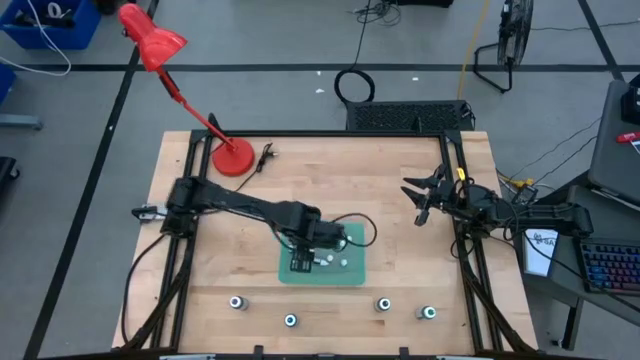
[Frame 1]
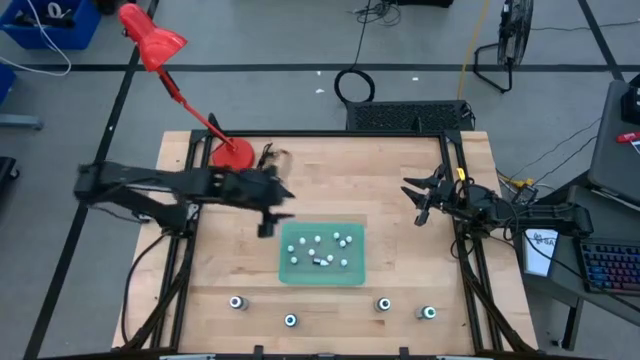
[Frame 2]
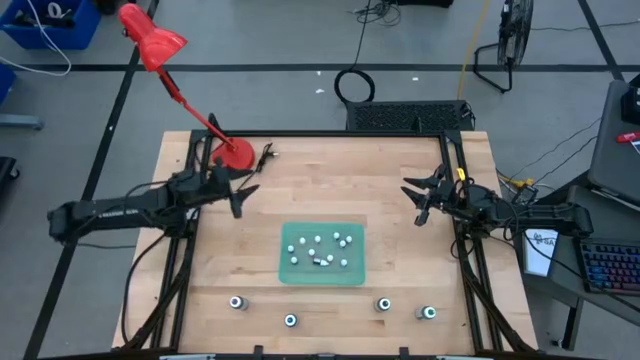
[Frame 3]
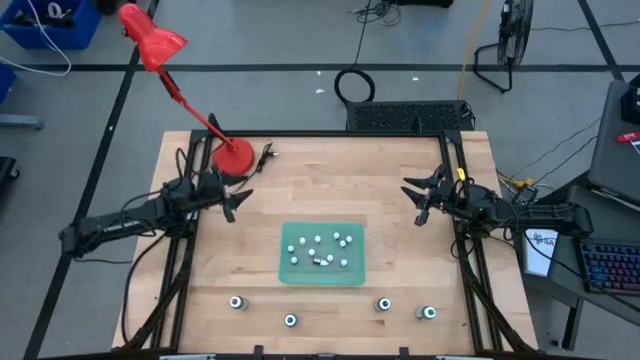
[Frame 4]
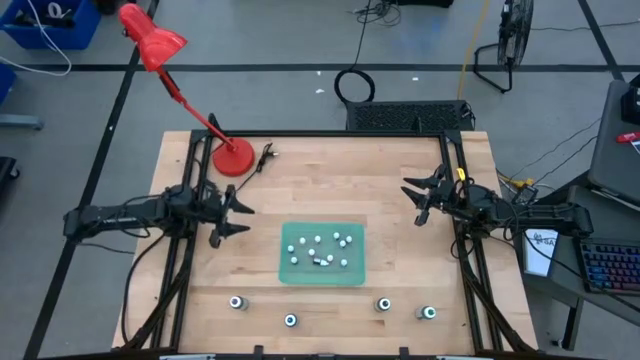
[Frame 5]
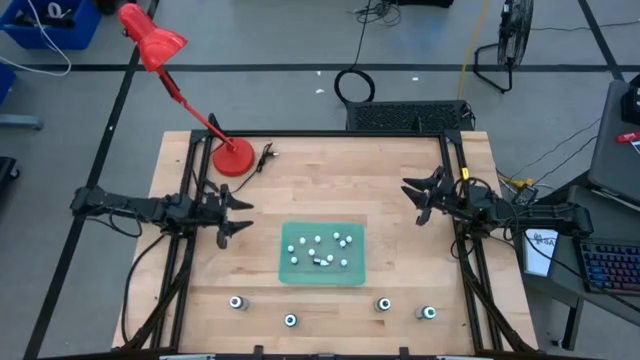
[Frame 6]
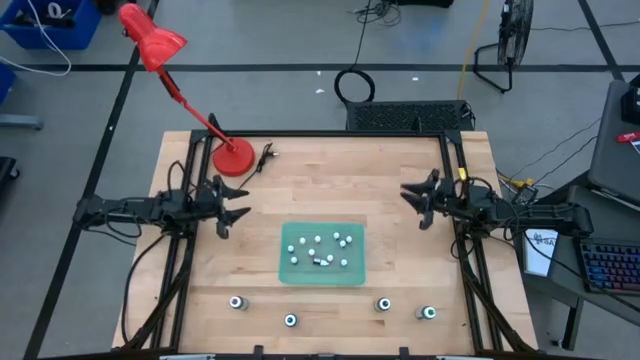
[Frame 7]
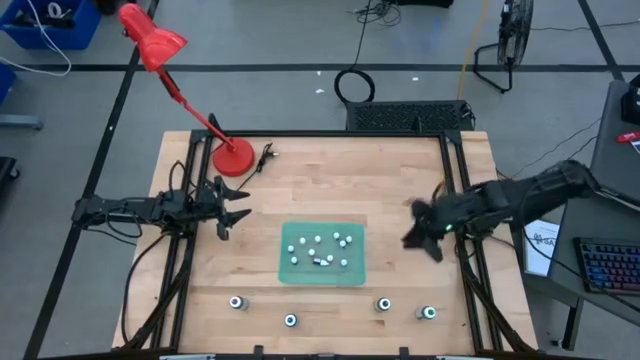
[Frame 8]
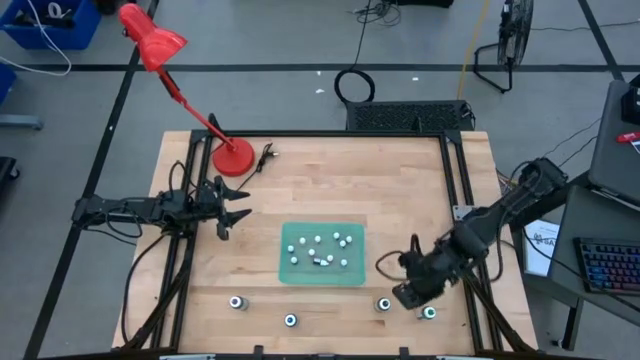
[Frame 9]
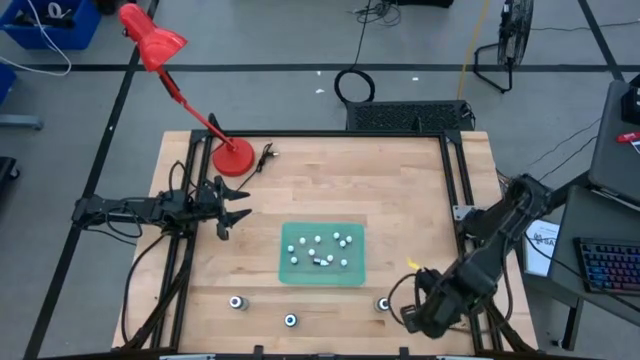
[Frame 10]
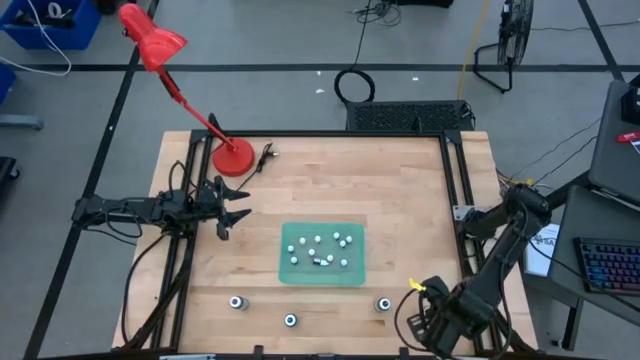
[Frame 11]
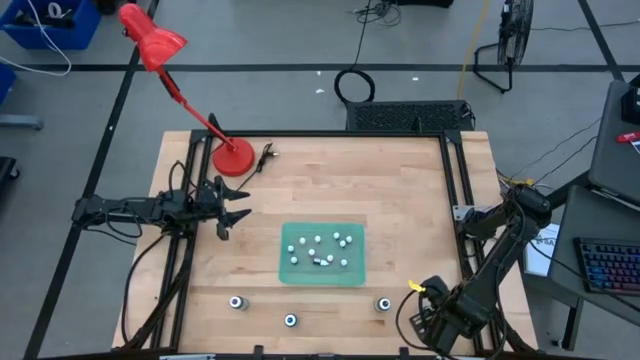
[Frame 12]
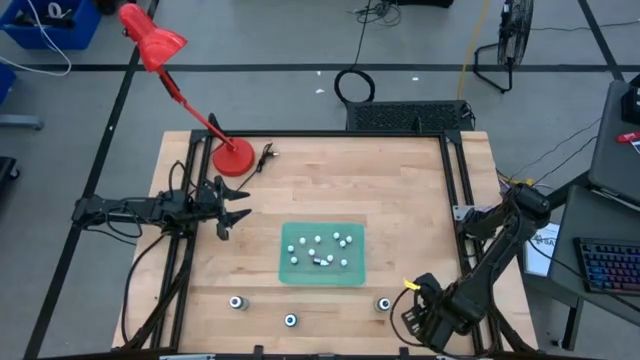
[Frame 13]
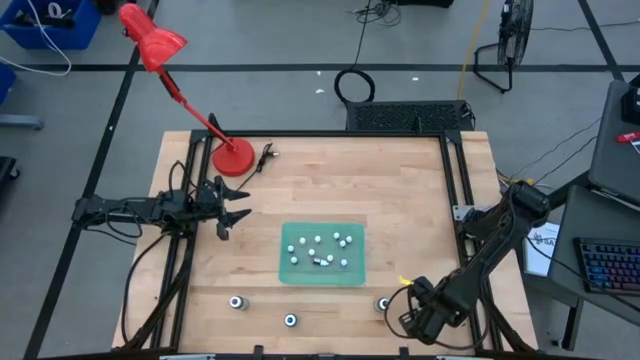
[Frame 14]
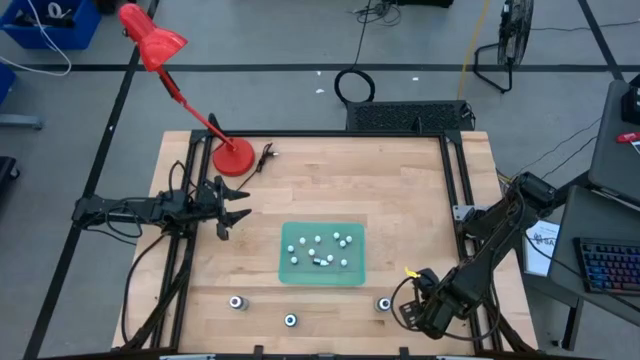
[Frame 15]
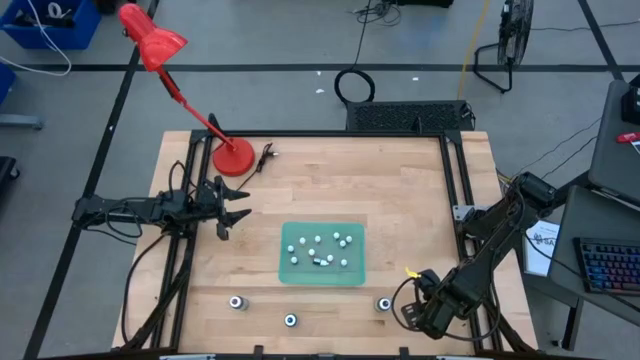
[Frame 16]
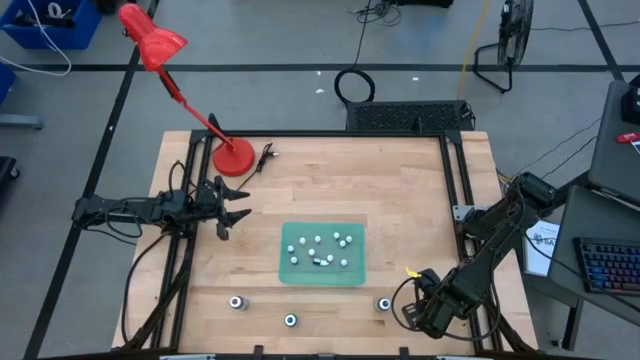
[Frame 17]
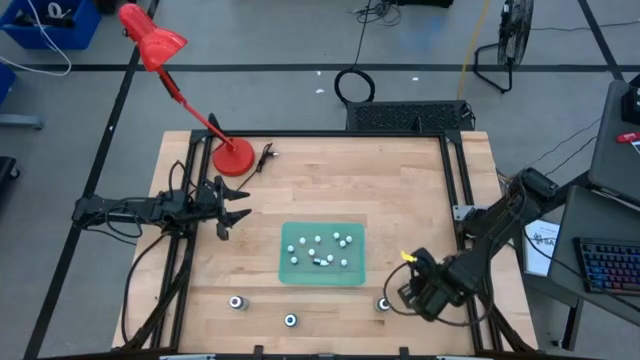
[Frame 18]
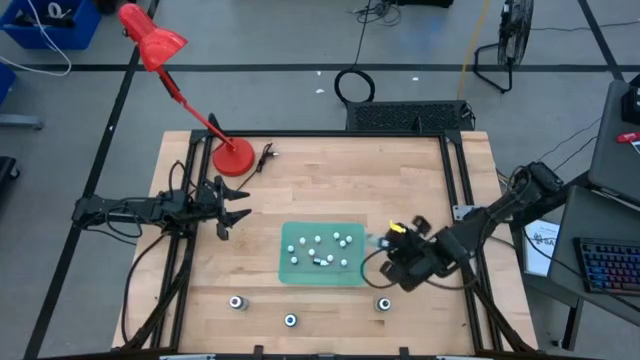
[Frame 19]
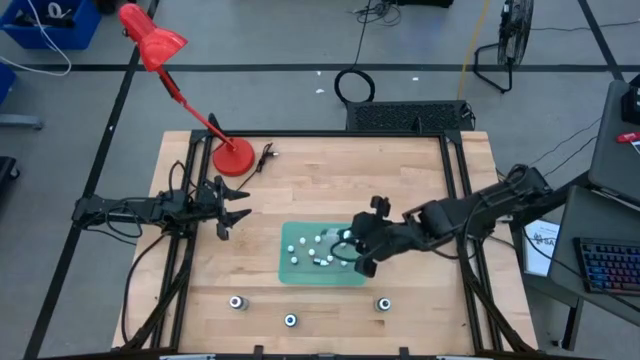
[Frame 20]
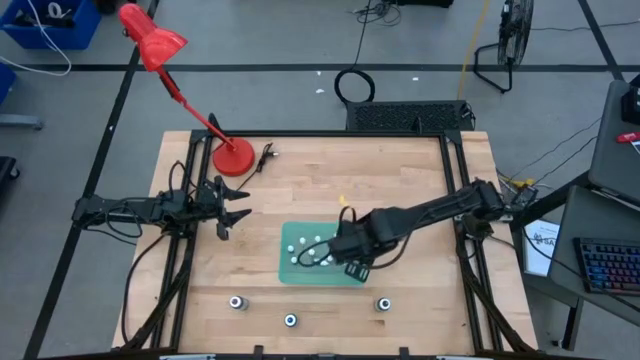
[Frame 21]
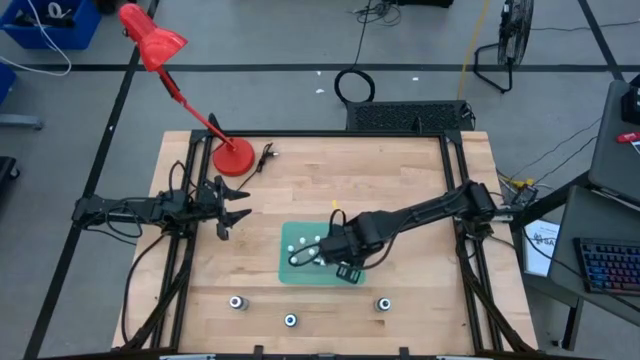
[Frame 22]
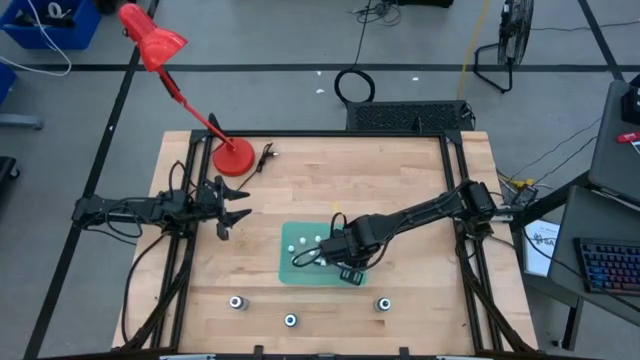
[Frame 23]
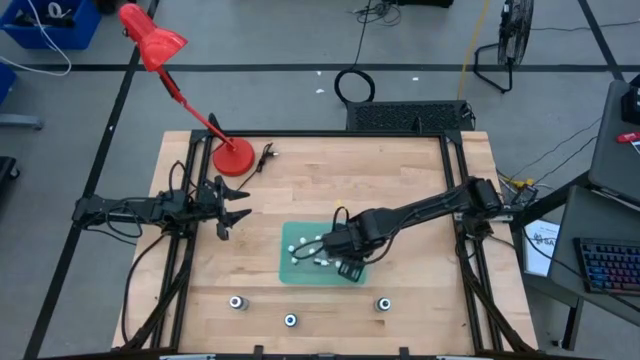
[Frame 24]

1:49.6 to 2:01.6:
Task: Pick & Place food coloring
Put the large green food coloring bottle into the green bin

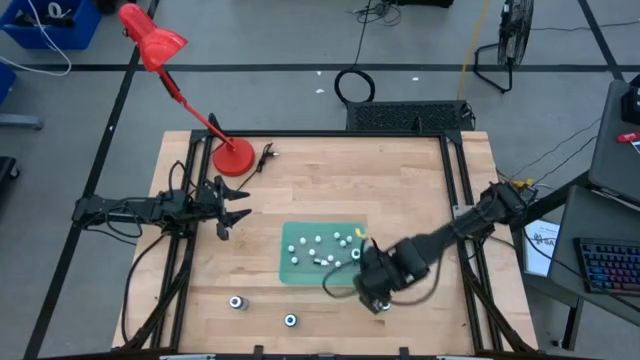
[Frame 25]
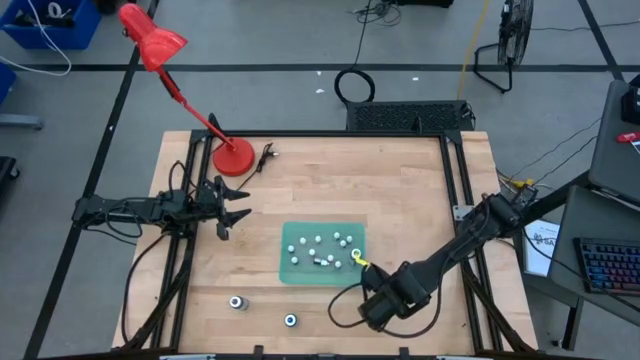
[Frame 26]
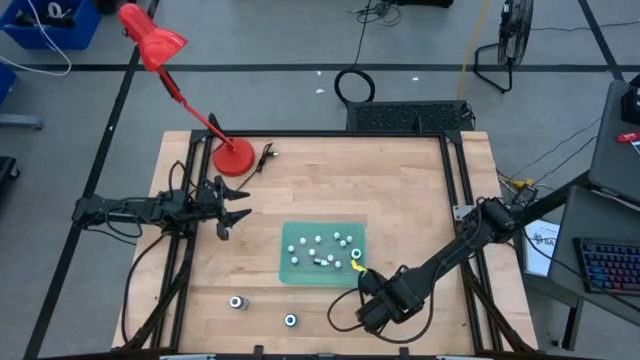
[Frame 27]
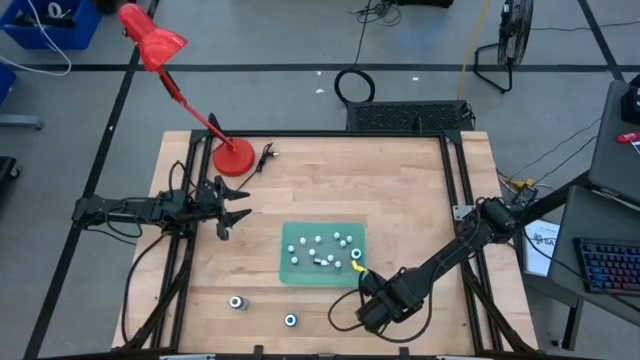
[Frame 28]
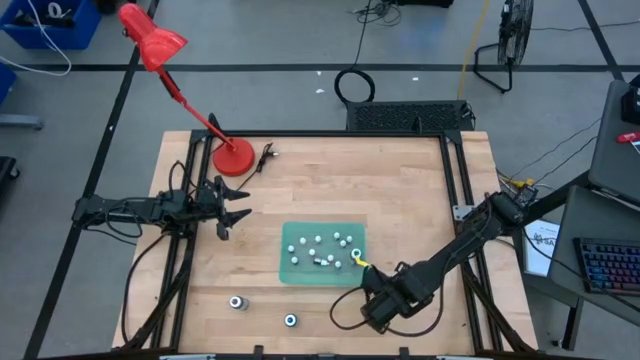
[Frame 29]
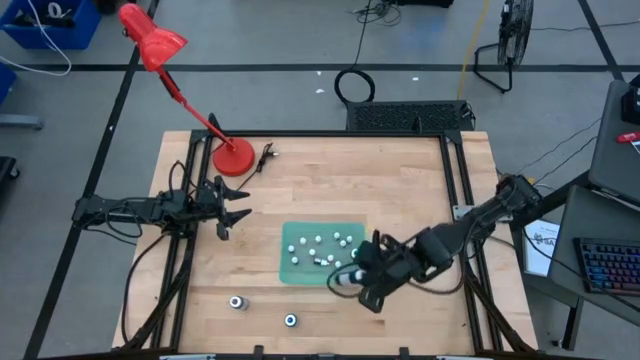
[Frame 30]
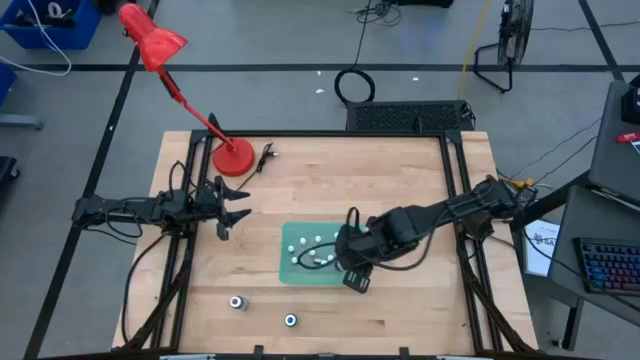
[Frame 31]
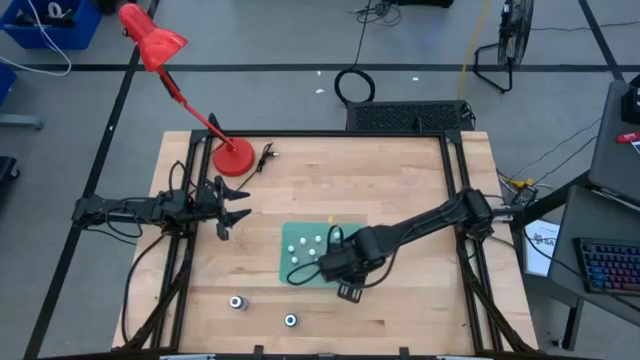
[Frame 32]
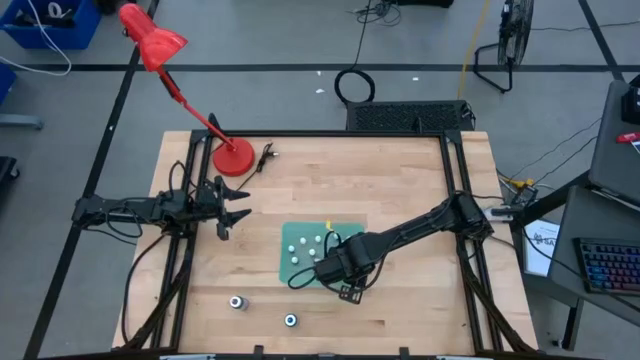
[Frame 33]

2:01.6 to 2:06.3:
Put the large black food coloring bottle into the green bin

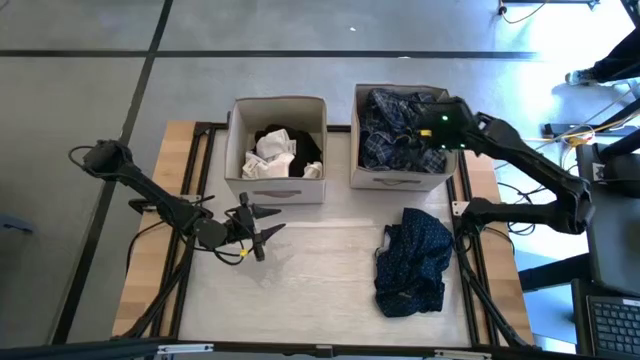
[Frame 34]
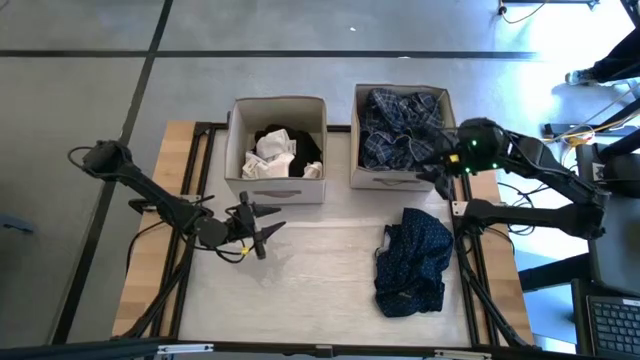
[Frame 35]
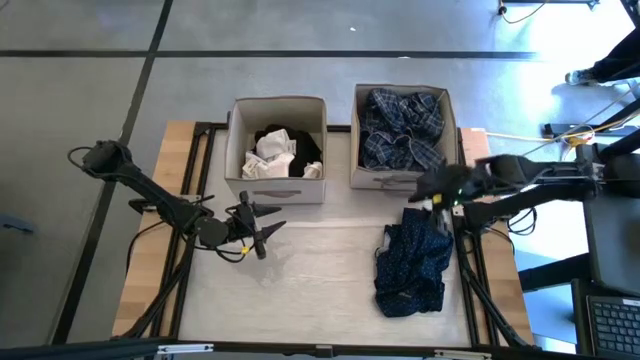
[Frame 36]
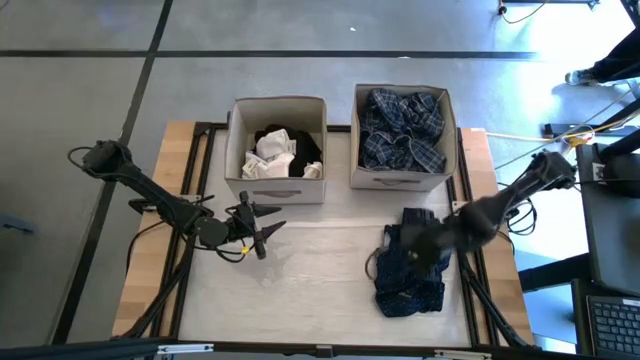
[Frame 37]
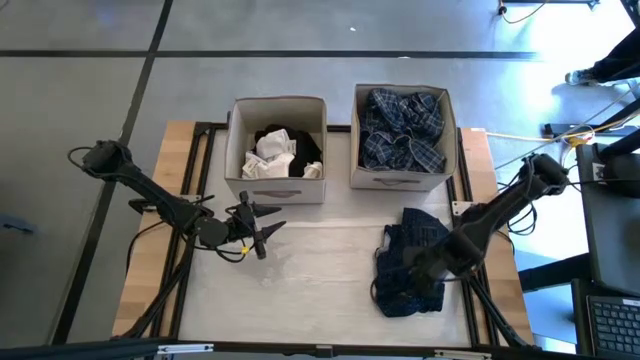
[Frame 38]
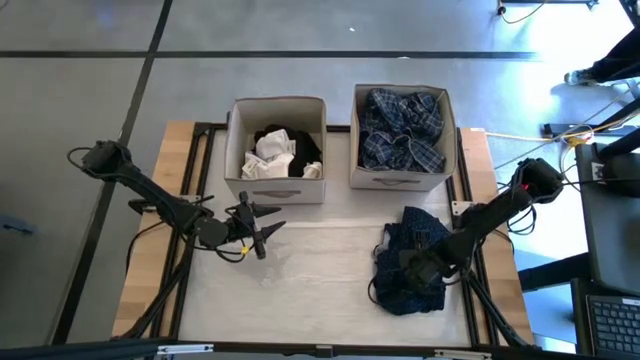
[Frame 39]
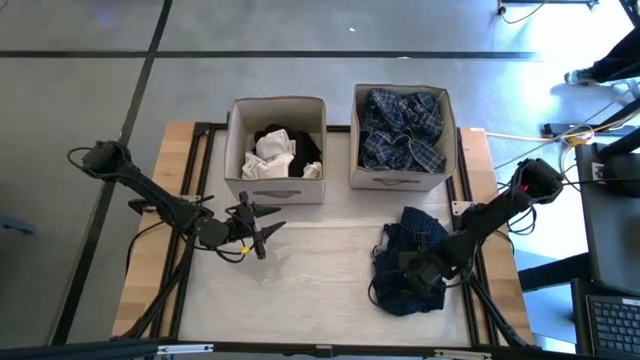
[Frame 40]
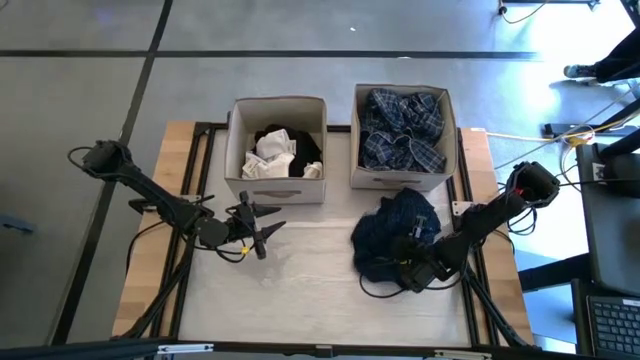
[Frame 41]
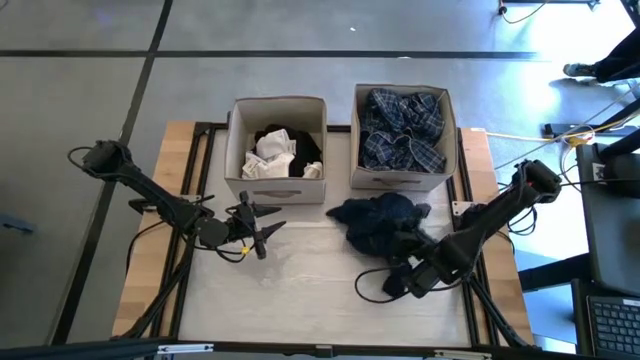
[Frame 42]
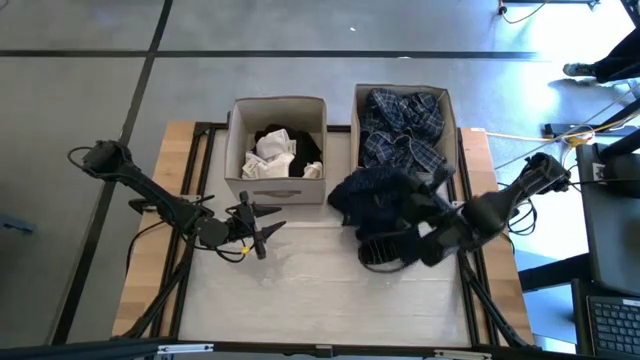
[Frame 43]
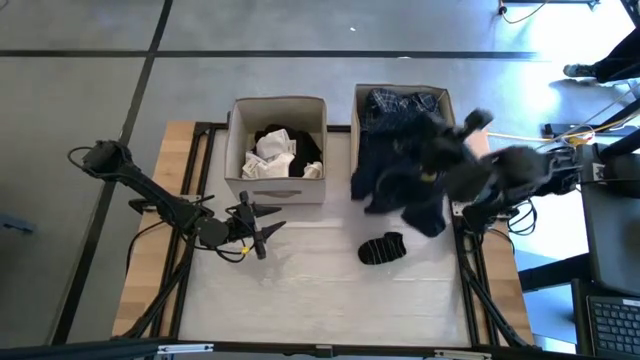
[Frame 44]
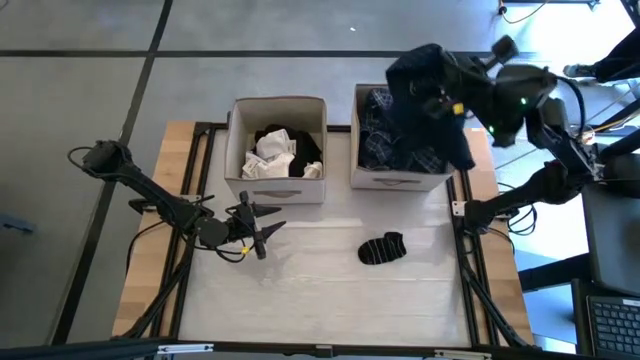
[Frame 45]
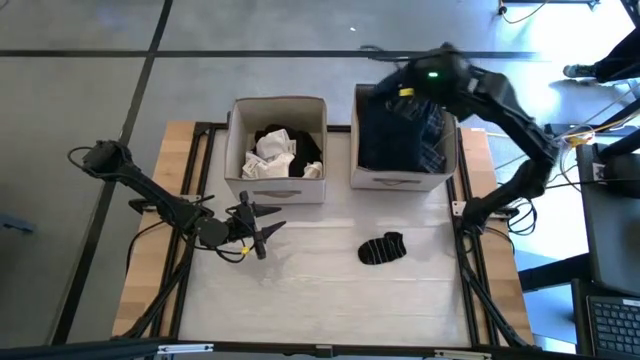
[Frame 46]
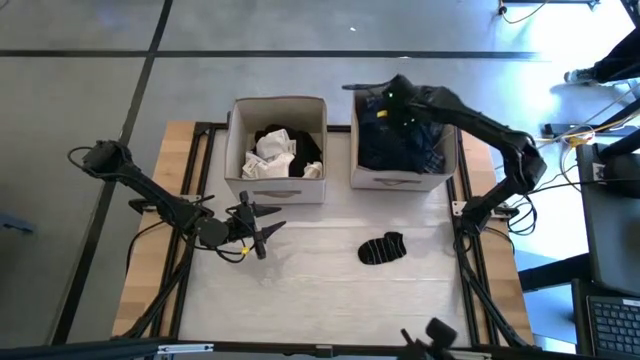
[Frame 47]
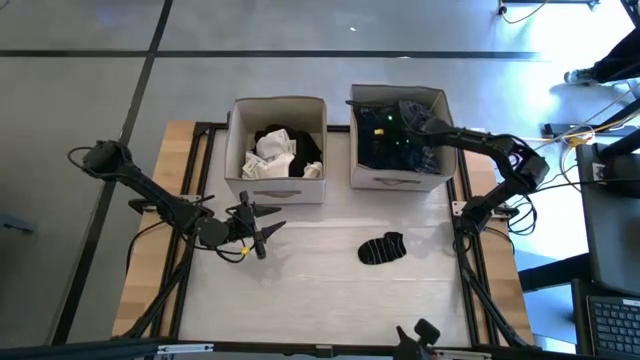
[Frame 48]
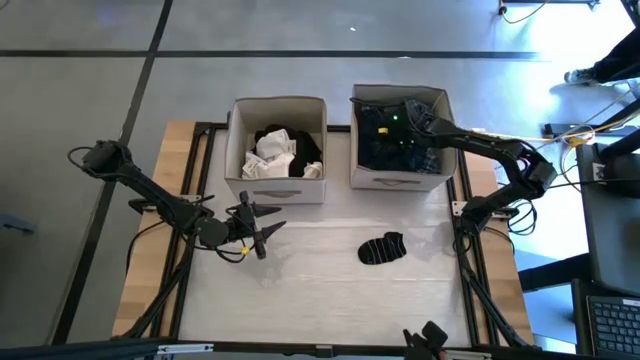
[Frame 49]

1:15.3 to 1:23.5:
Task: Sort clothes
Put the dotted blue shirt into the right laundry organizer
